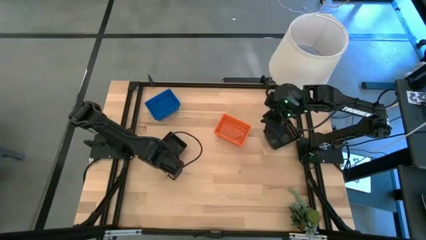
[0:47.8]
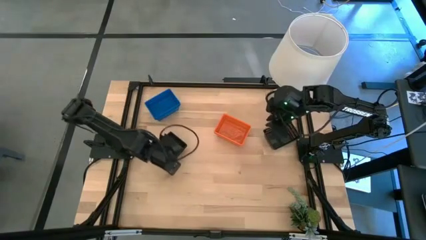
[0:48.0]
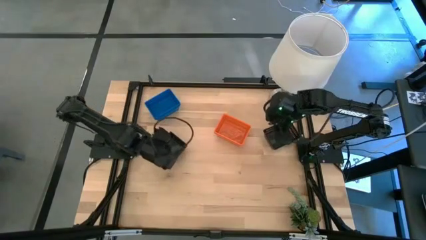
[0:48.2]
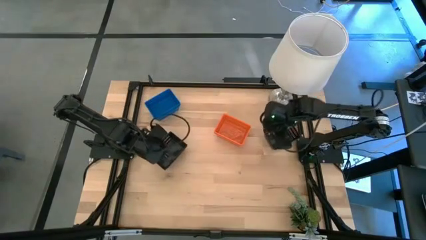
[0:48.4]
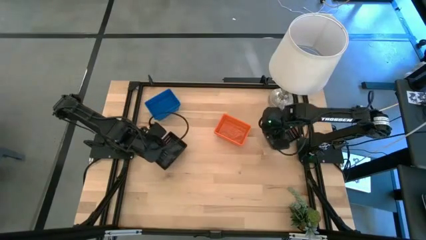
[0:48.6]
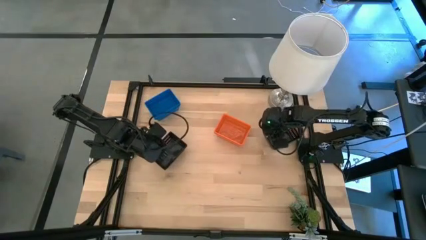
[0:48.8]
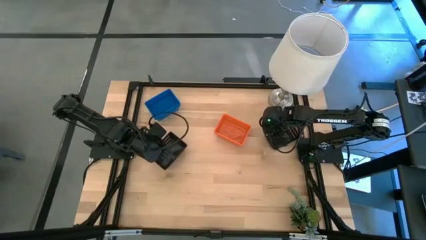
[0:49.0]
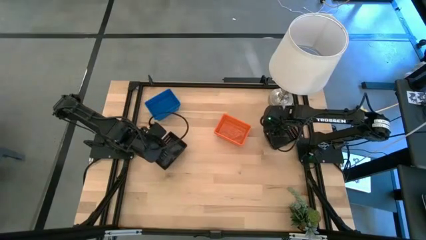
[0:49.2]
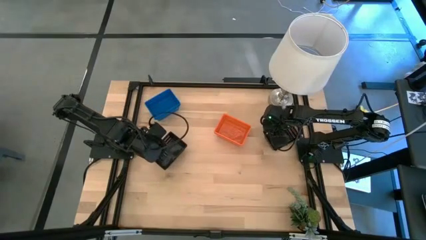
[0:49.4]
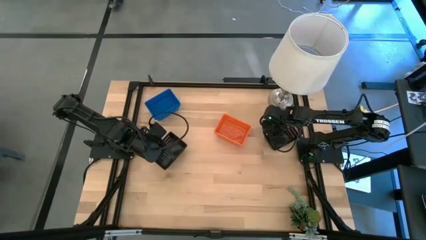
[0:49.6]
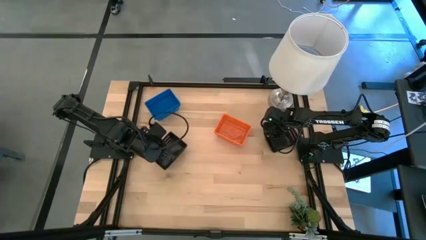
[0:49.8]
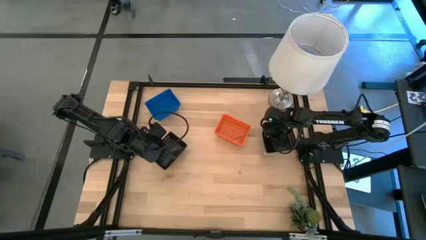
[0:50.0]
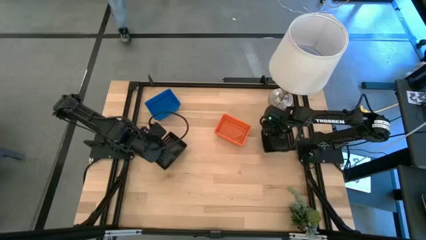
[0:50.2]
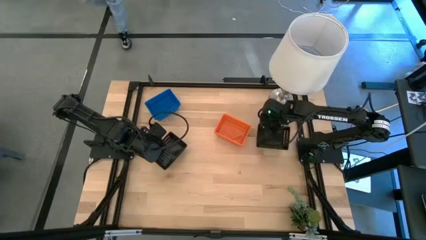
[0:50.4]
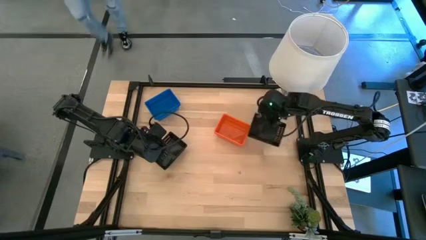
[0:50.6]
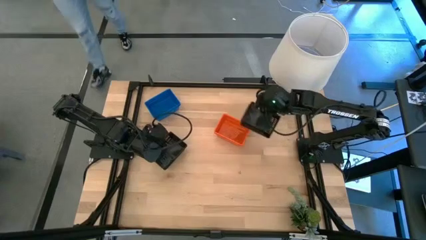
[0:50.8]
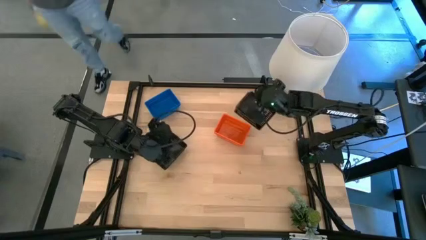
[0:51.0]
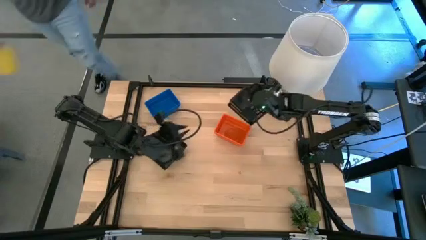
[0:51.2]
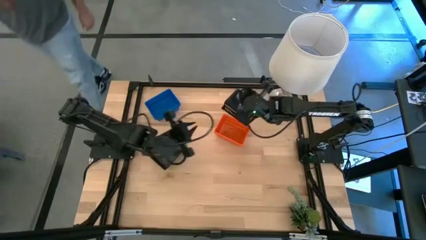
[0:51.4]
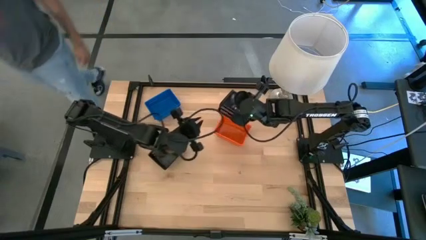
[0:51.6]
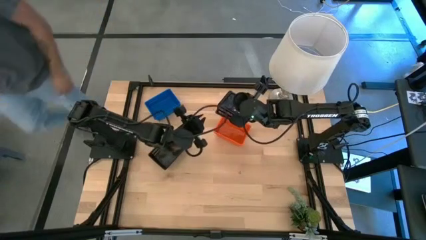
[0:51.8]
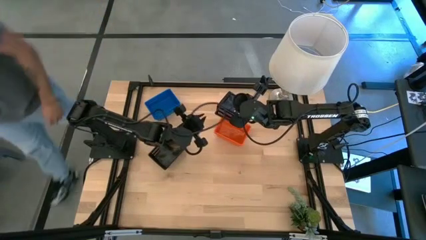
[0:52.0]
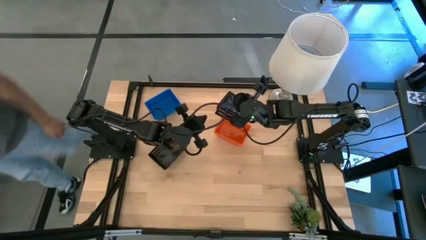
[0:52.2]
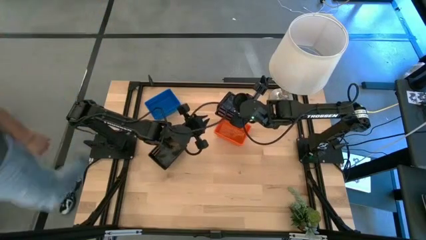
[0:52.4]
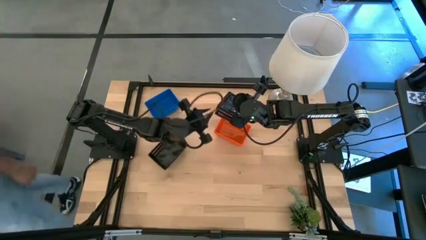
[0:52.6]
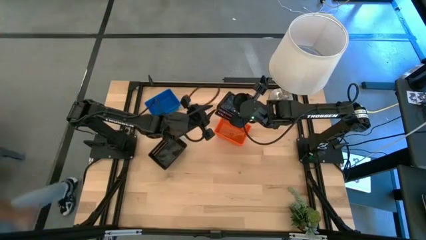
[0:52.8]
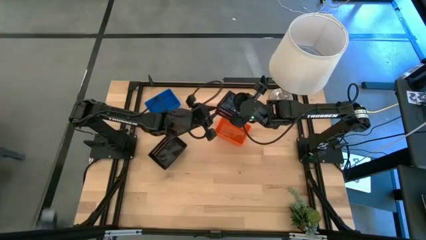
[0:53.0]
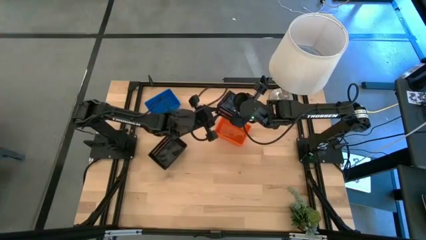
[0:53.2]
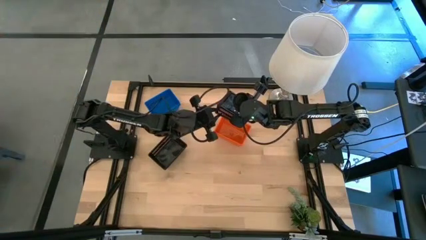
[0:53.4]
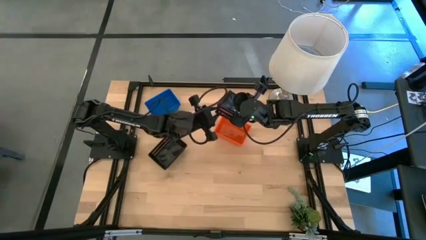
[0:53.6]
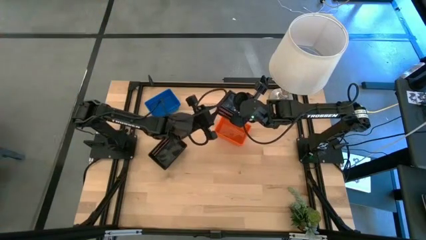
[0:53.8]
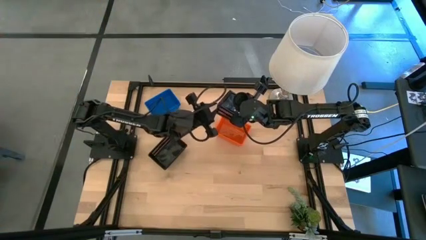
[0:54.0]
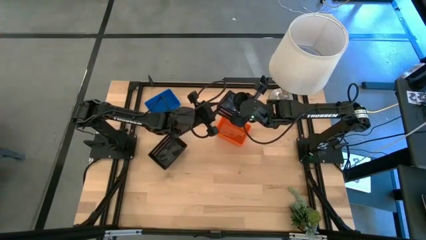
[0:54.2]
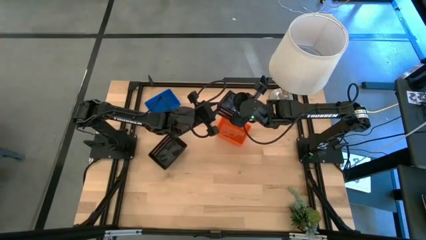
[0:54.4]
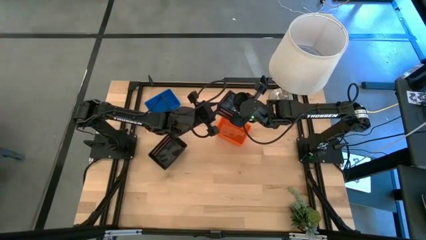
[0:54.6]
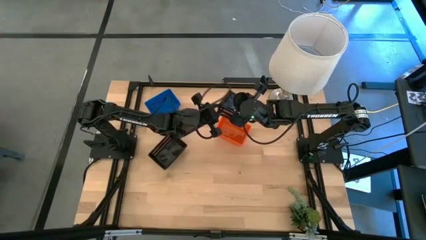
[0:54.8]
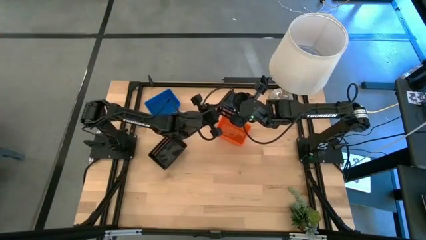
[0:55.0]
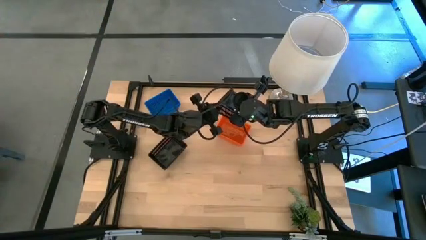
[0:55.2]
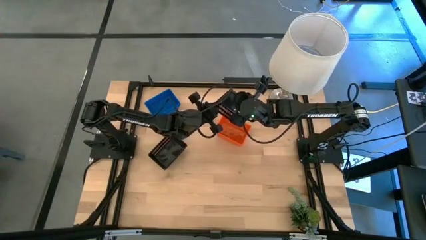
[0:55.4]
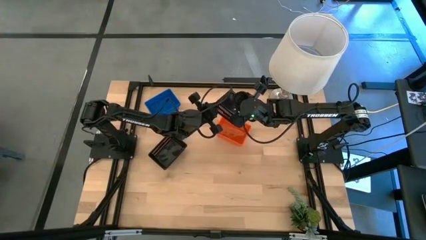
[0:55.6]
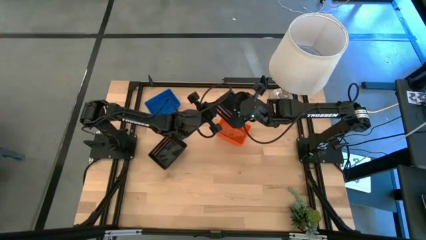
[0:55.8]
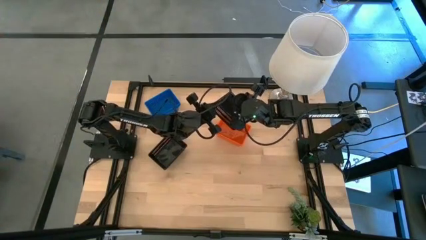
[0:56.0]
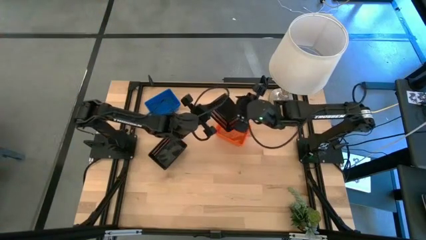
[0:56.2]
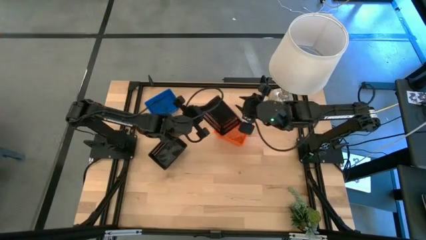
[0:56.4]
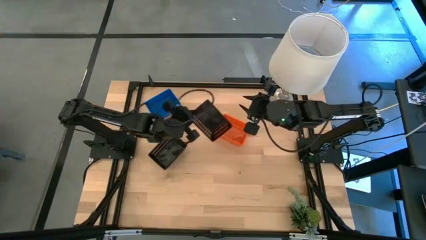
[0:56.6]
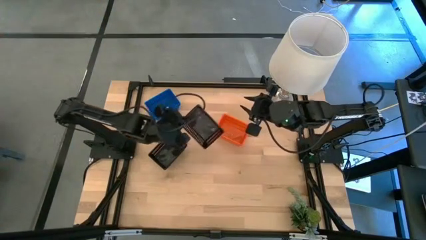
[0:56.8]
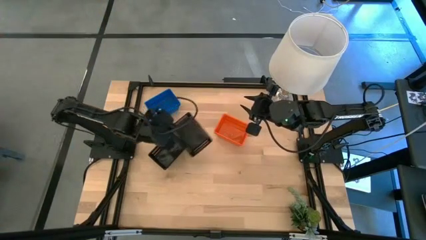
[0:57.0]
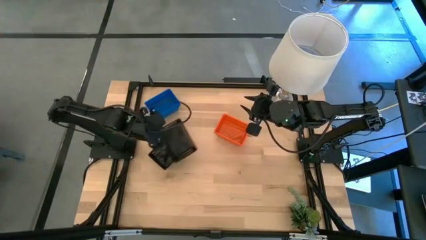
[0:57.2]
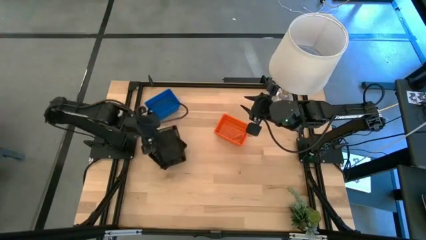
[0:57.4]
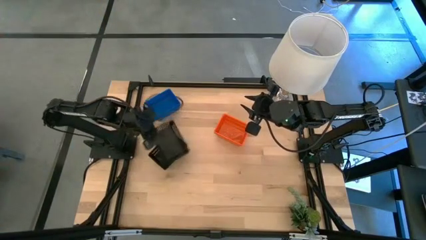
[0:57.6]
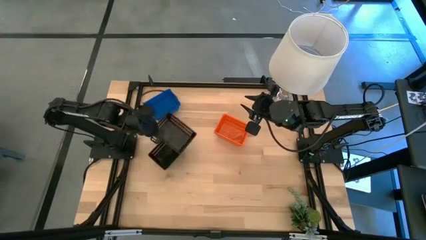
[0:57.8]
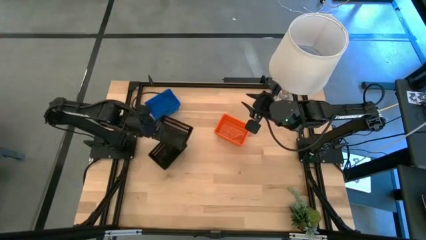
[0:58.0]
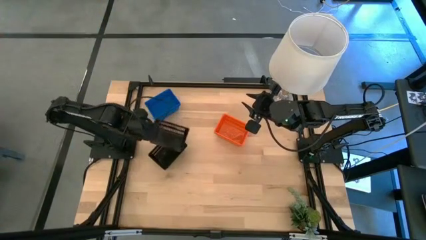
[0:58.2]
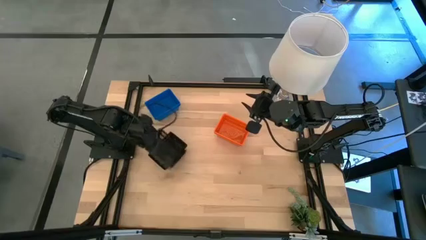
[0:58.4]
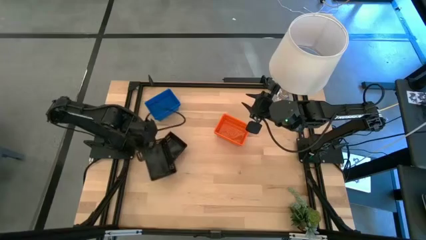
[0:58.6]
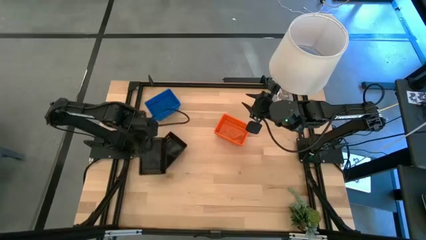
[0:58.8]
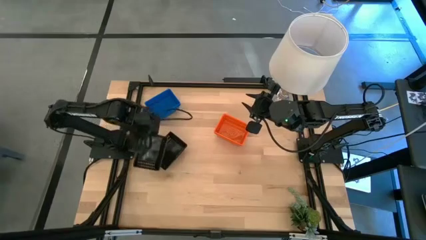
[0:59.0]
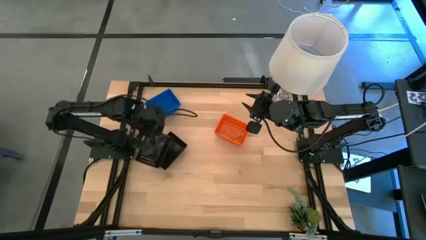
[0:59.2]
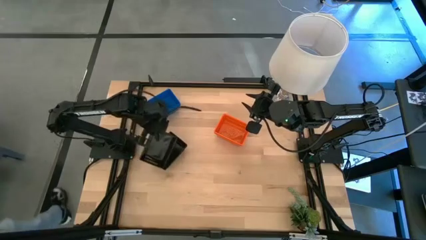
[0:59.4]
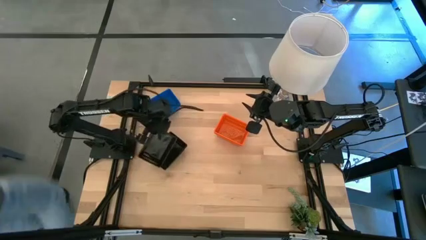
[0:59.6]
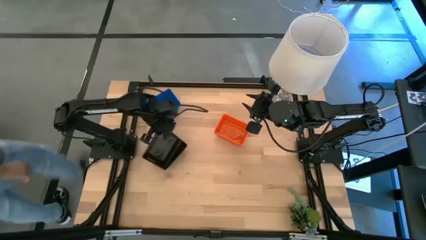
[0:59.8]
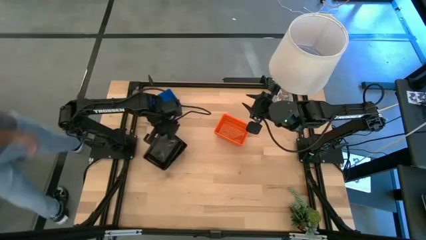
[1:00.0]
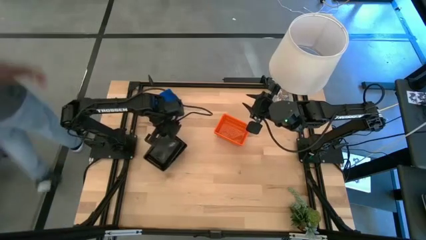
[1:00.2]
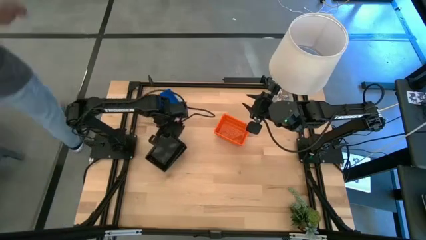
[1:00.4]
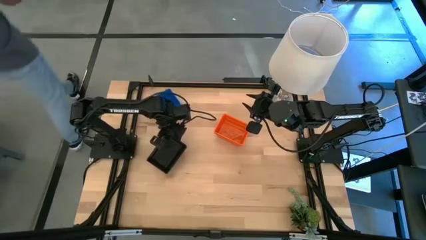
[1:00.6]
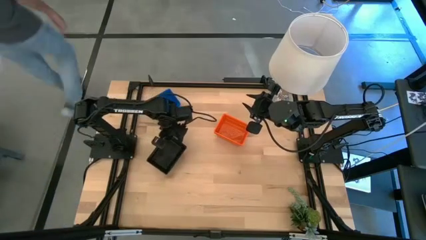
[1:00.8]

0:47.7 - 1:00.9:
Stack the right black bin on top of the left black bin

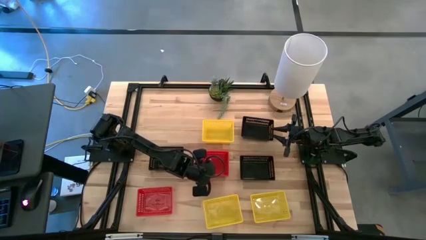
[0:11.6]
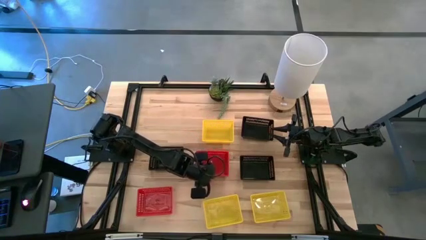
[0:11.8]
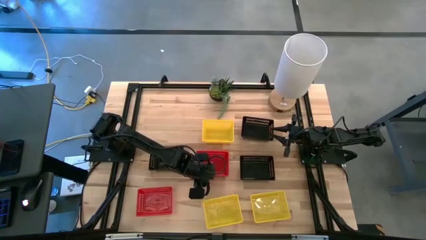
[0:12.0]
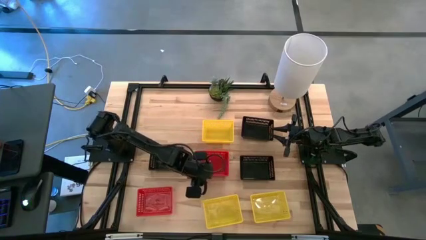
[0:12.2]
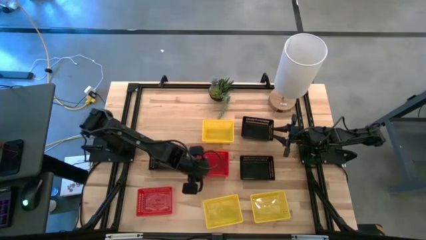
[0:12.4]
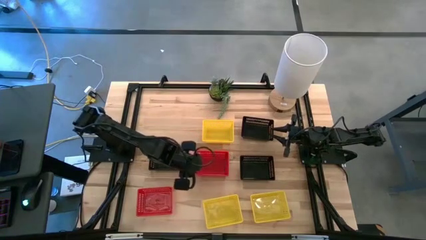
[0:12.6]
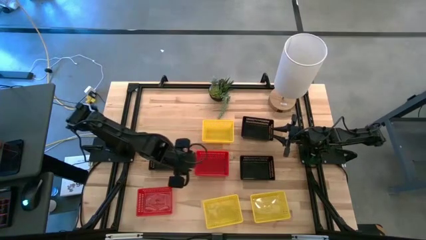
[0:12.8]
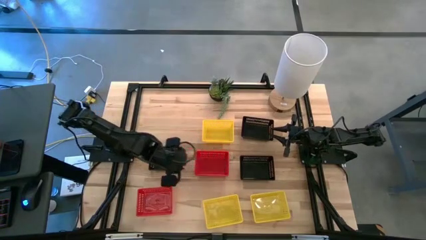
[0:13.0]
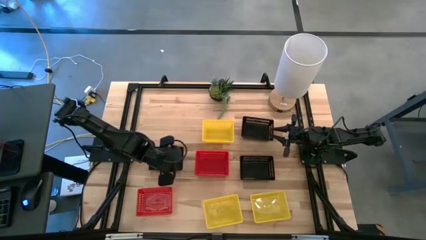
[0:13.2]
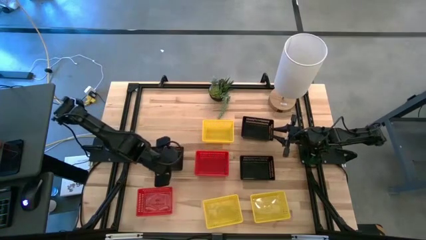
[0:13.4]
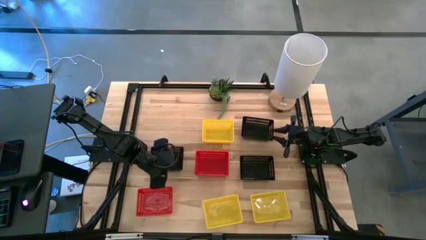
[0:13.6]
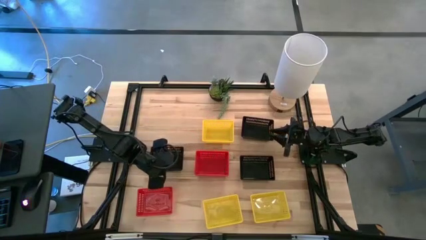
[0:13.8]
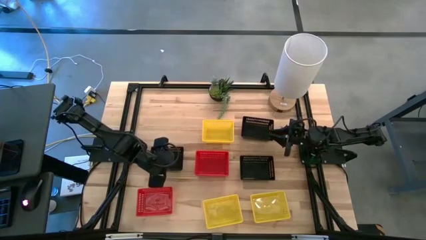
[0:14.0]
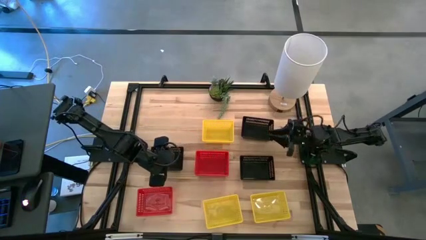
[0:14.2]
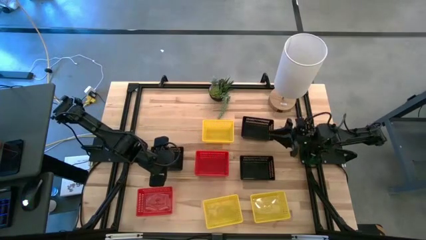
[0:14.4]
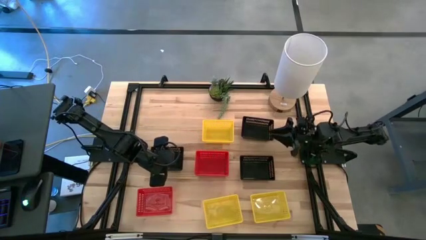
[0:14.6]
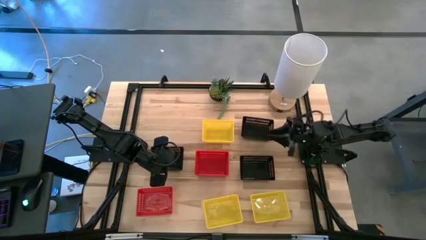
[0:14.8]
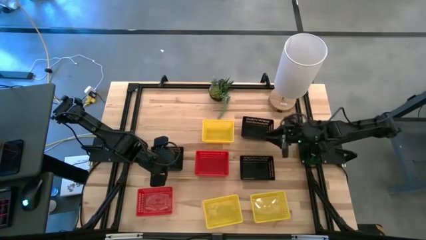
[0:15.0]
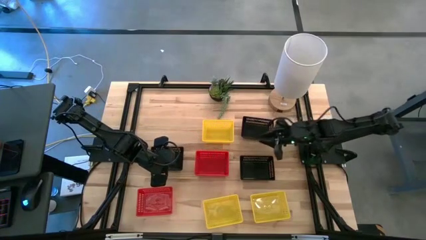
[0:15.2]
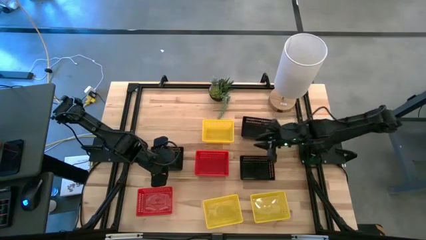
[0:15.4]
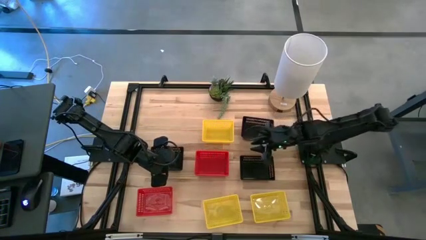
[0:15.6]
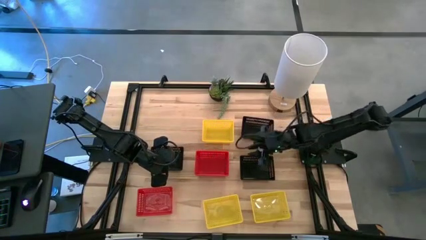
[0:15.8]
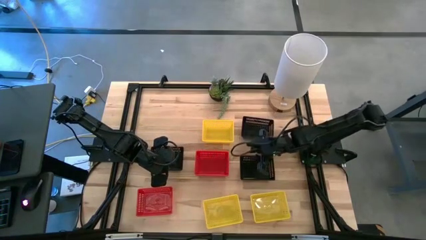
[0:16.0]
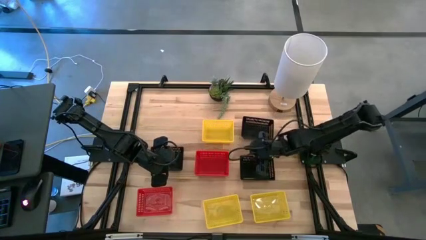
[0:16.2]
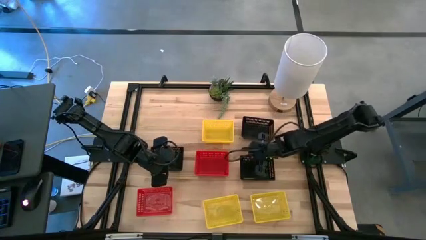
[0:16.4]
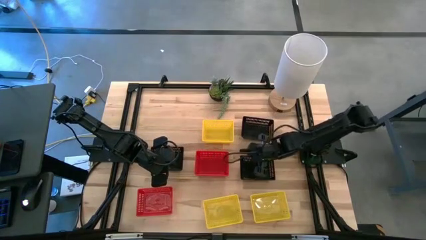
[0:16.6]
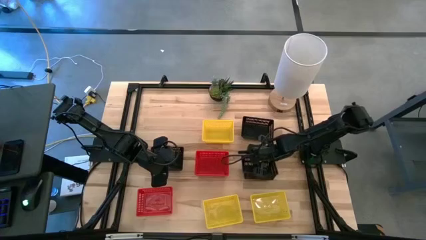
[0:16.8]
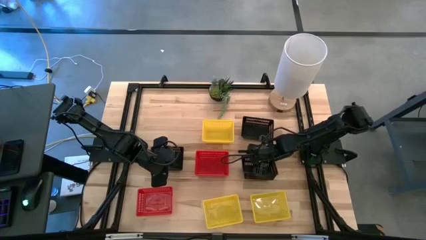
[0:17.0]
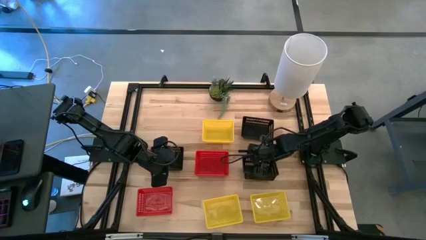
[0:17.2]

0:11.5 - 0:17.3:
Stack the bottom right black bin on the top black bin
